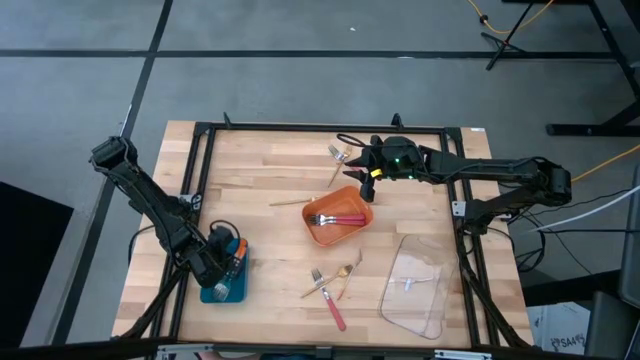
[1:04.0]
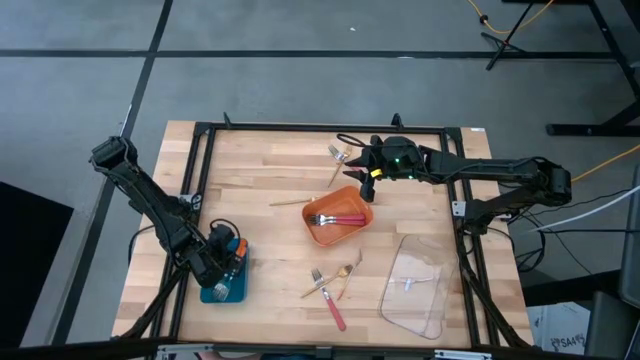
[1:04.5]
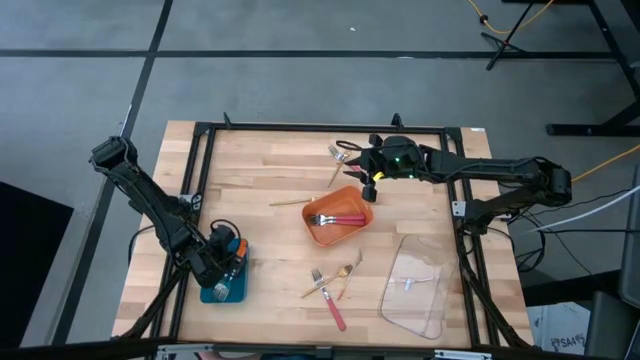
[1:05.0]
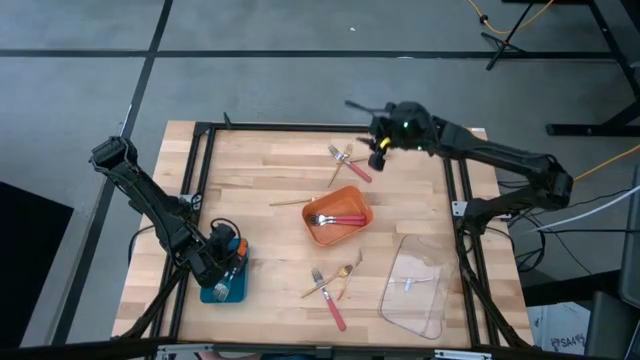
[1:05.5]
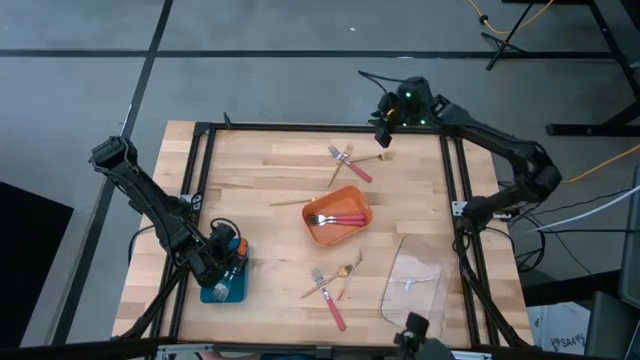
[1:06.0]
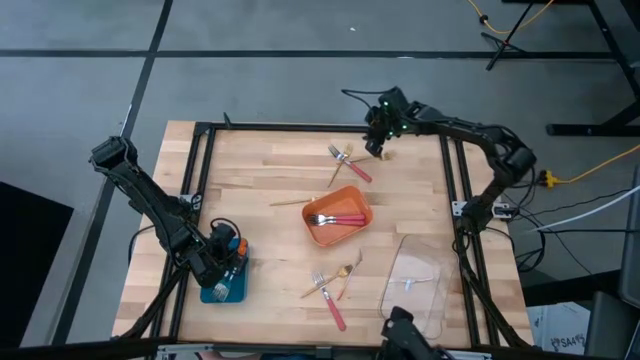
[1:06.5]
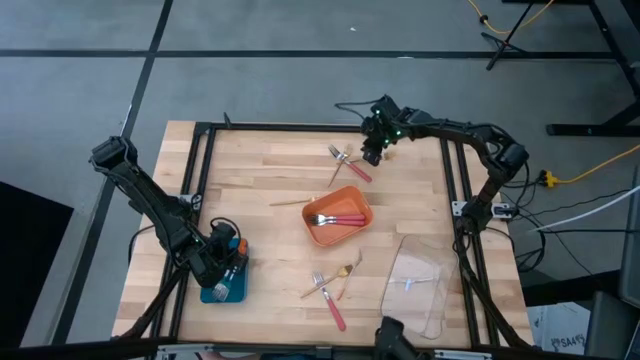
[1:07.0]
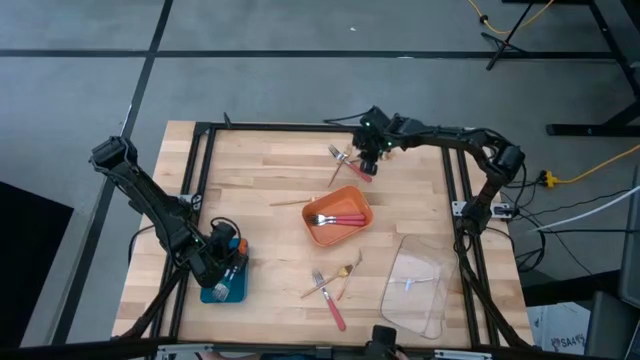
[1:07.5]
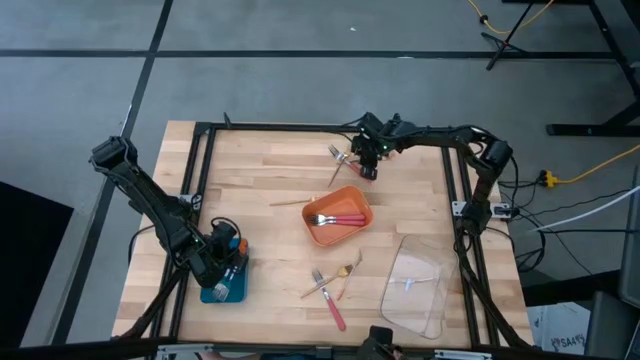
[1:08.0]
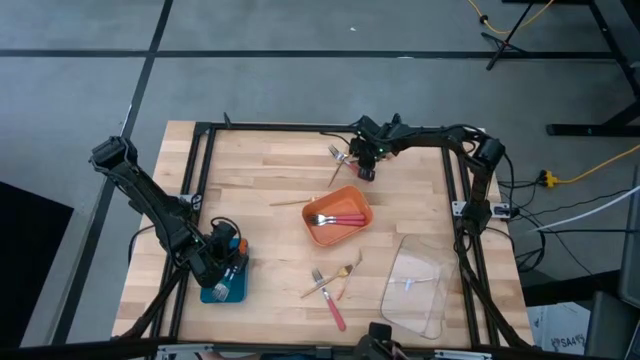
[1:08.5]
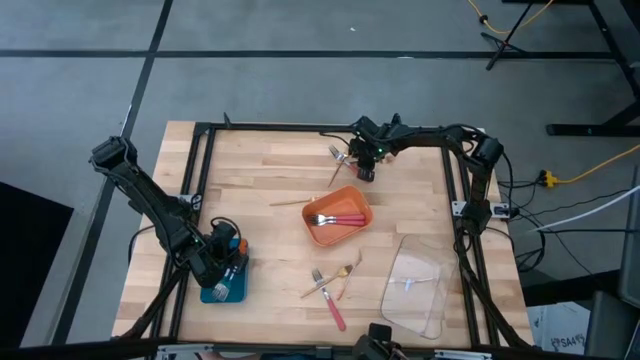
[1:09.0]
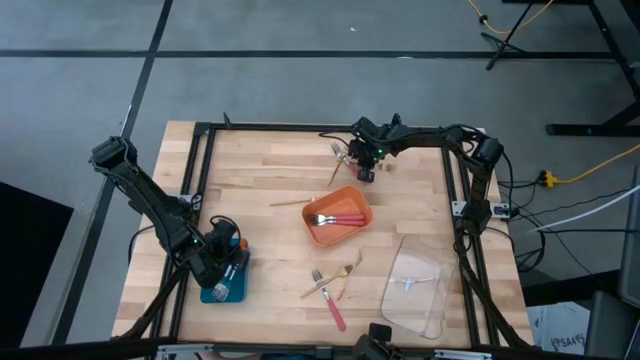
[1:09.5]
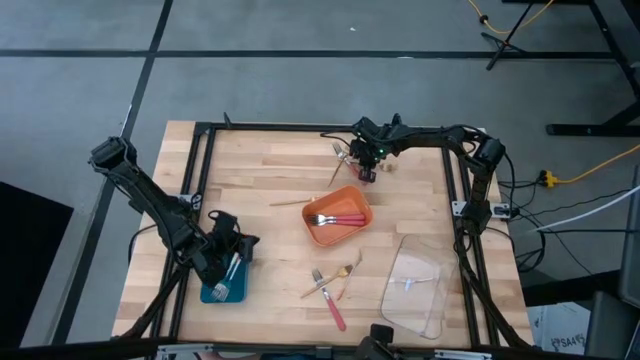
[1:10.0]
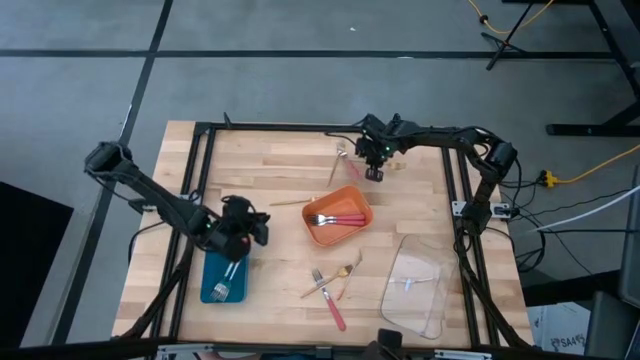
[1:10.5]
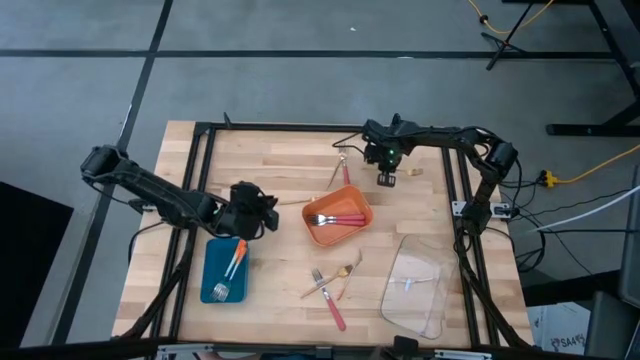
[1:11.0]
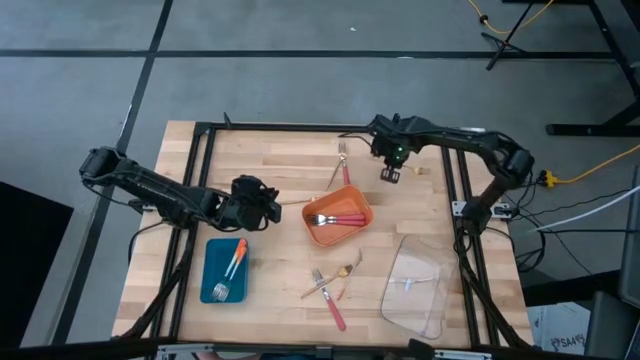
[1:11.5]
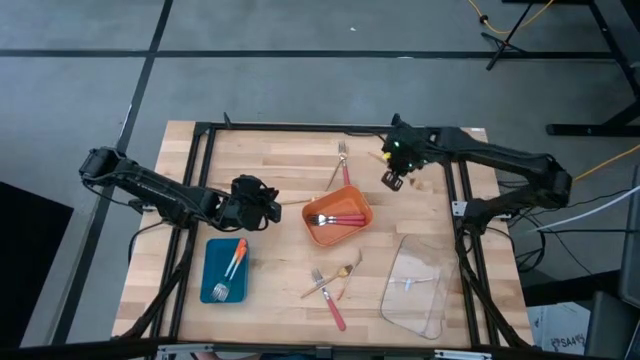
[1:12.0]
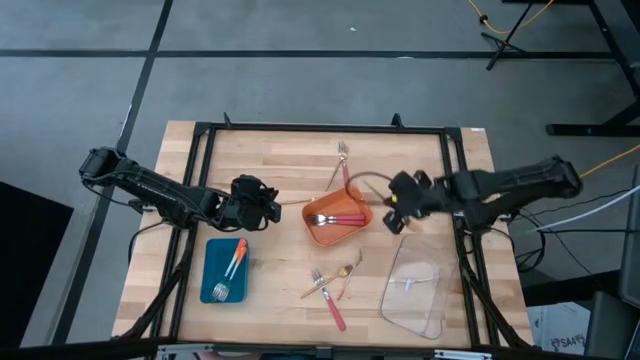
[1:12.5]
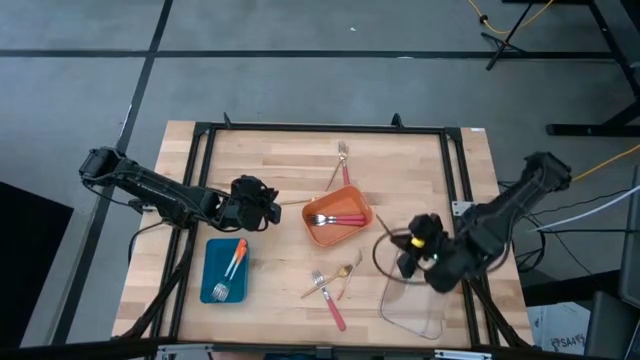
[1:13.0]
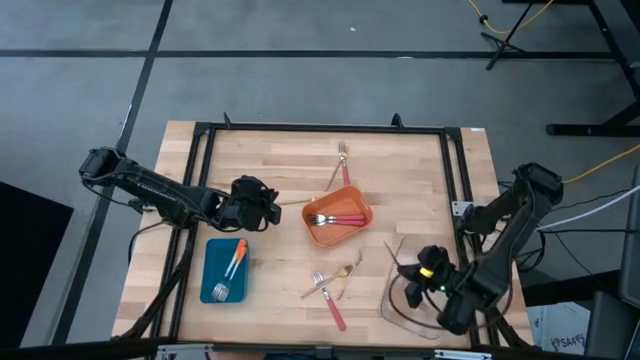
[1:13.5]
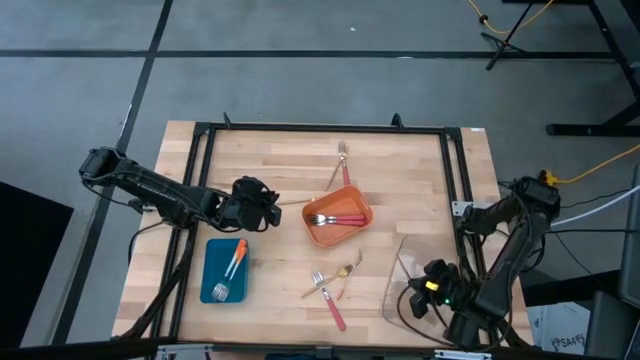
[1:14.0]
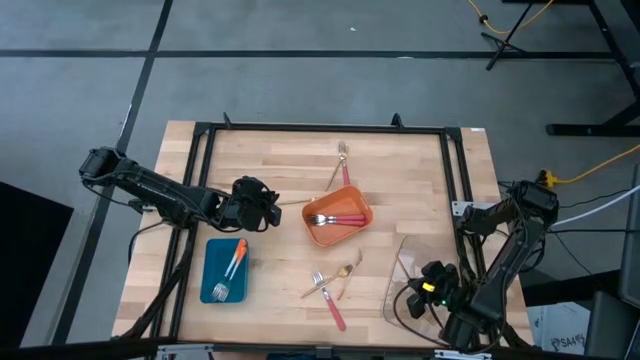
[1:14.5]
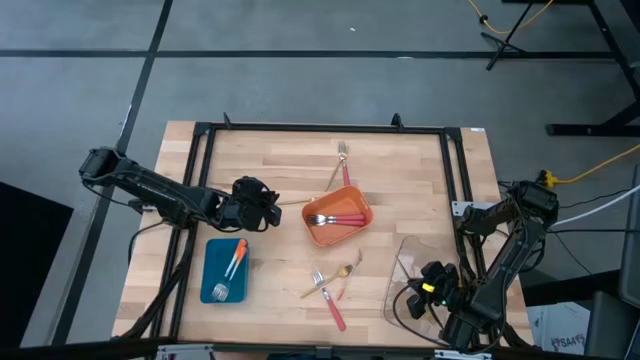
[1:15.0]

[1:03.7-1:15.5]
Task: Sort silverware by color (type)
Put the gold fork into the transparent bin

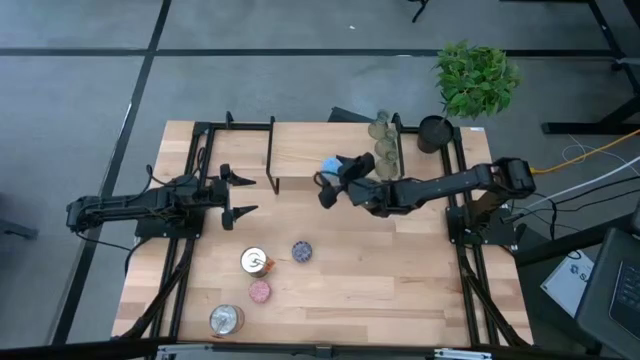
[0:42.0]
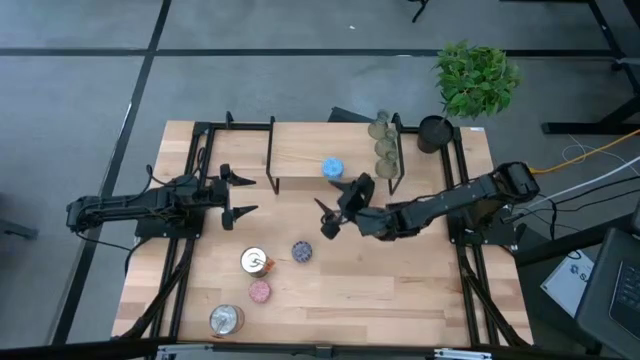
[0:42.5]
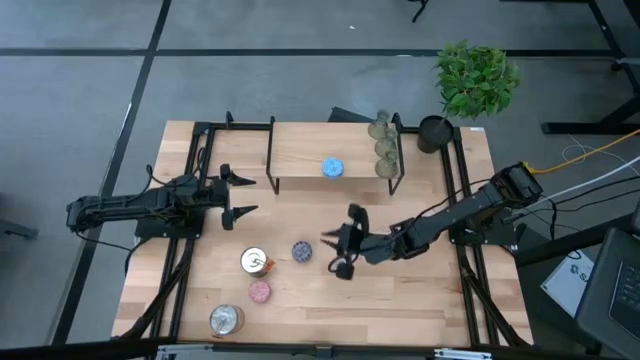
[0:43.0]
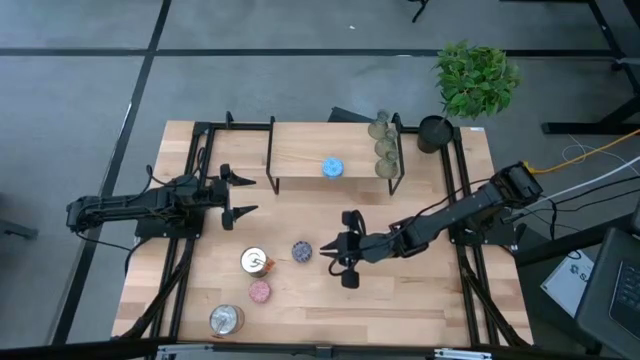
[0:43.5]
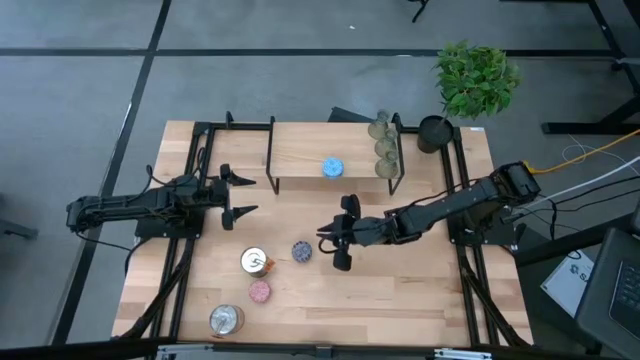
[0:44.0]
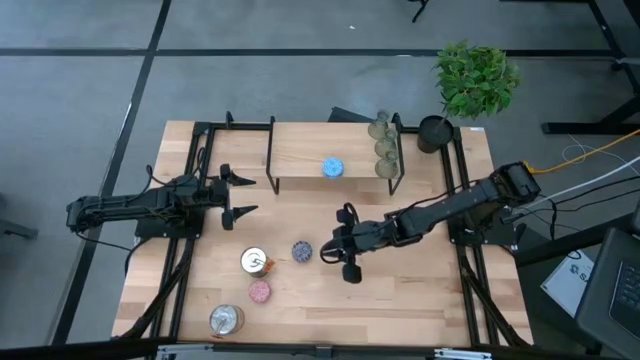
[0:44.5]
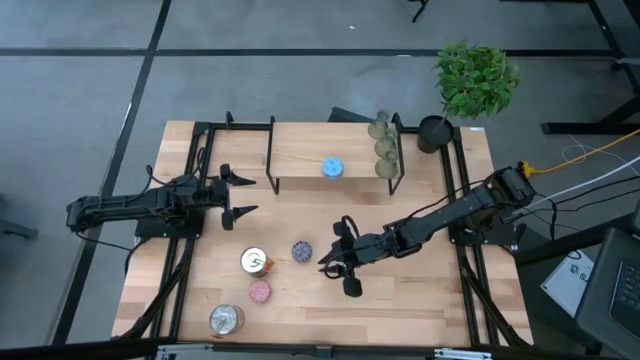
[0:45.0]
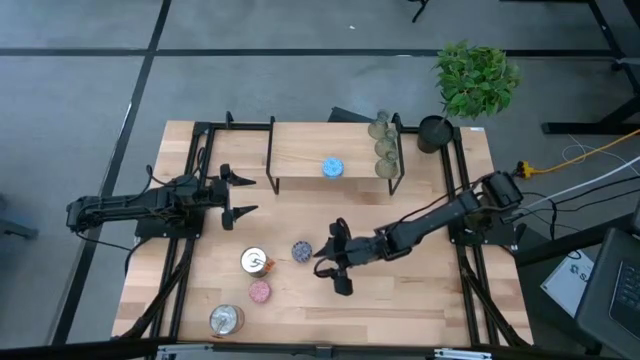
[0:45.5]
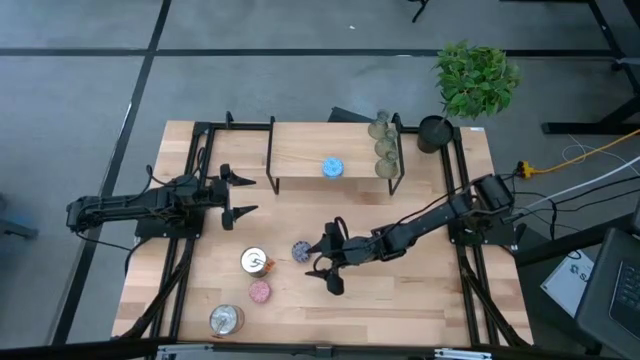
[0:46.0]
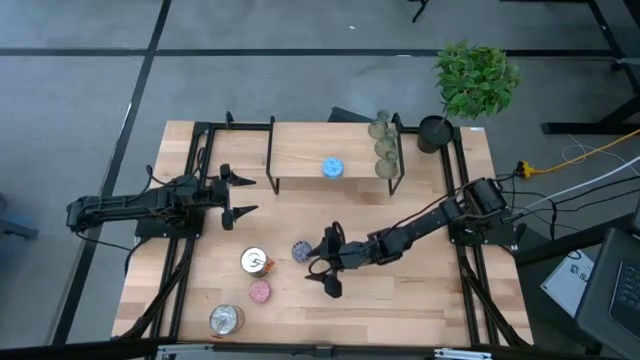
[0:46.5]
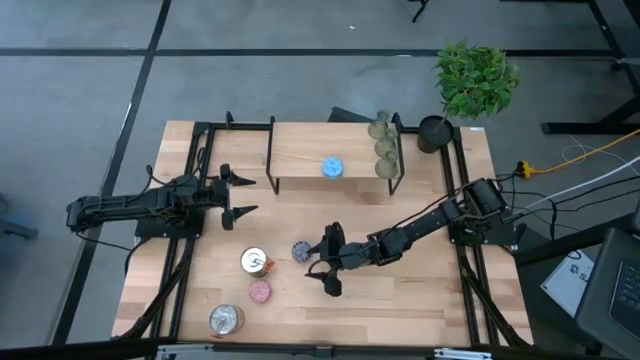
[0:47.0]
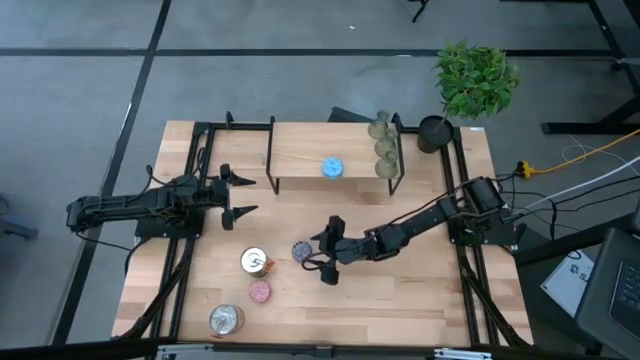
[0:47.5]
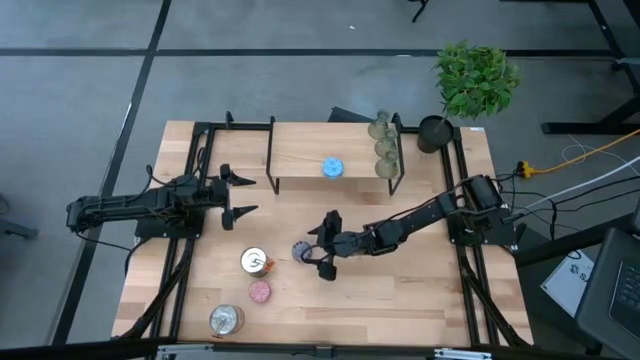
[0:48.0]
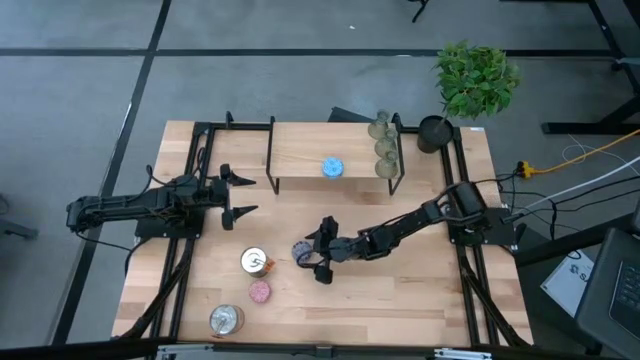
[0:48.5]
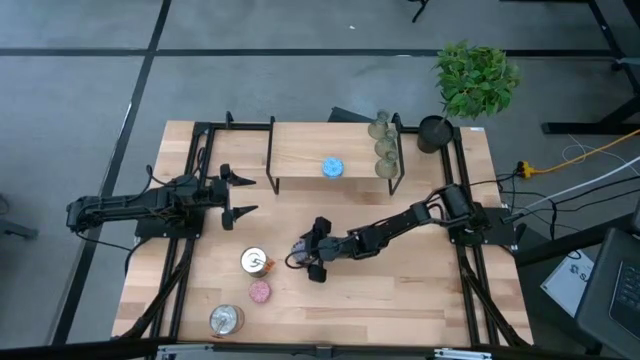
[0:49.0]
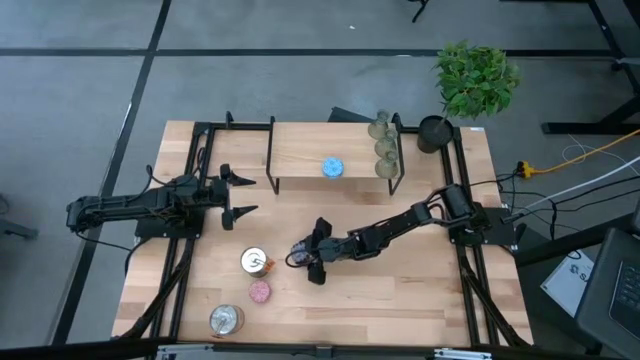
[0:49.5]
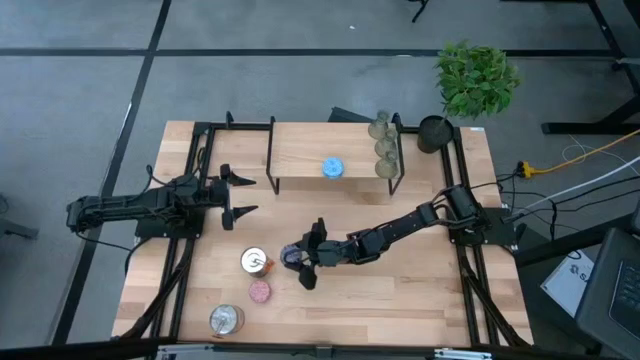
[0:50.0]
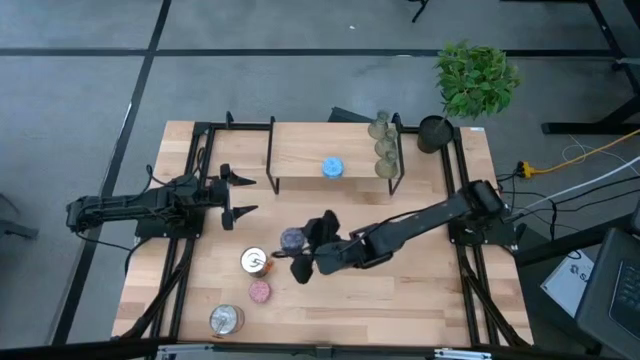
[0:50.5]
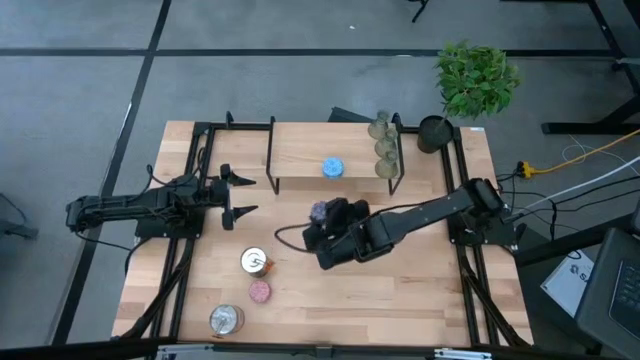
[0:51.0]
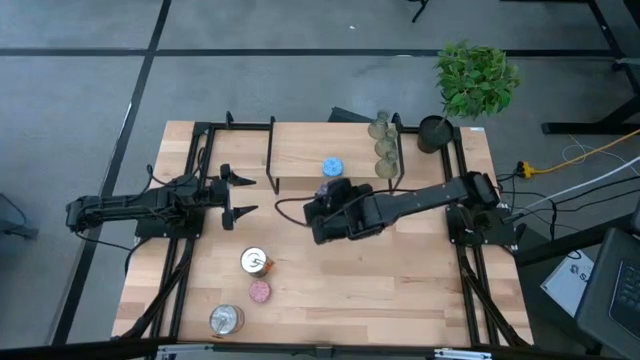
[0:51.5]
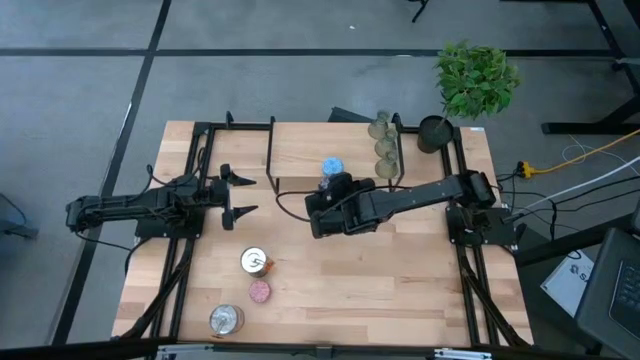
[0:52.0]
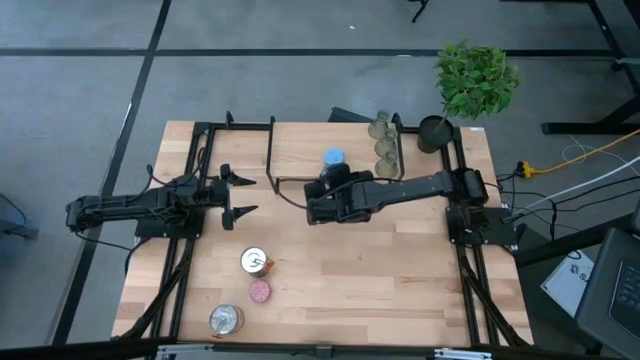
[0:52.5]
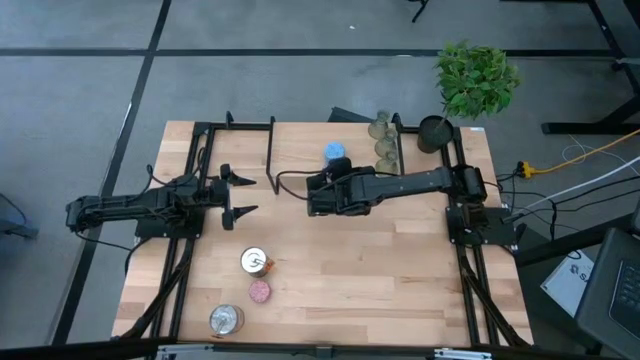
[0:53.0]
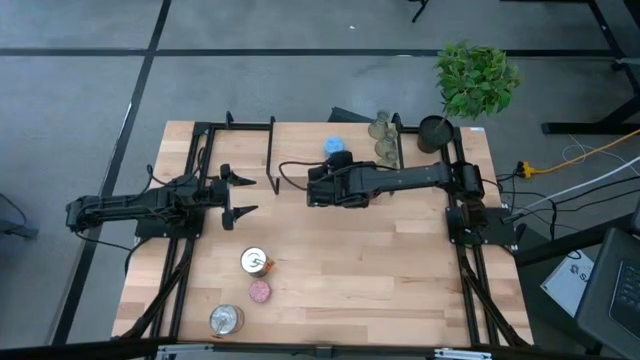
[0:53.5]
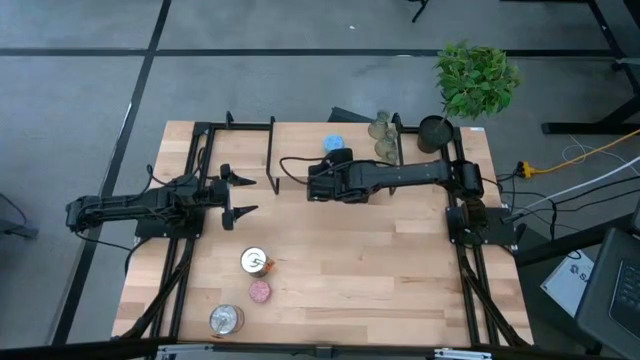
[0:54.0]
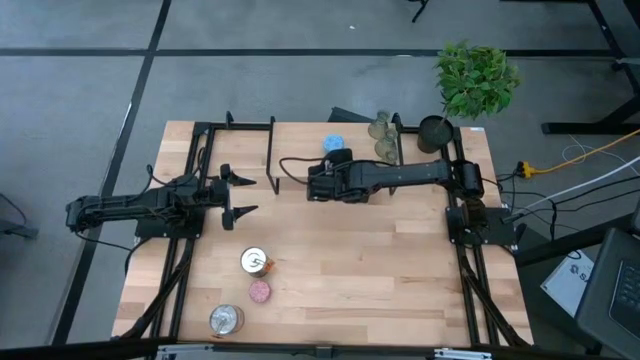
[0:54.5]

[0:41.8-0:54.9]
Task: Pick & Place candle stick holders
Put the patterned red scented candle on the shelf aligned with the patterned blue scented candle
